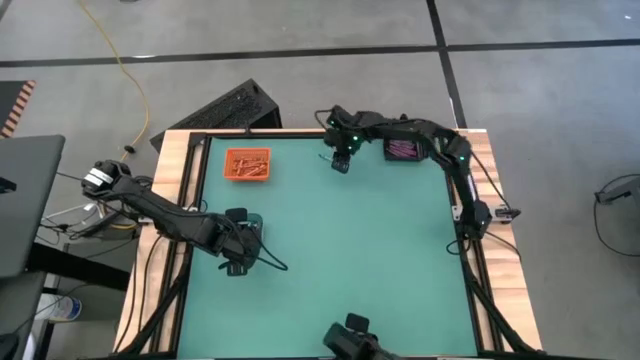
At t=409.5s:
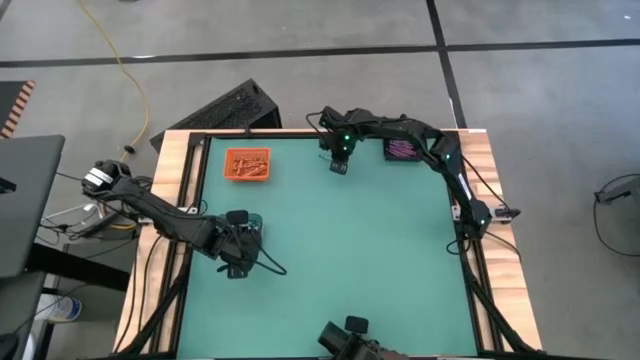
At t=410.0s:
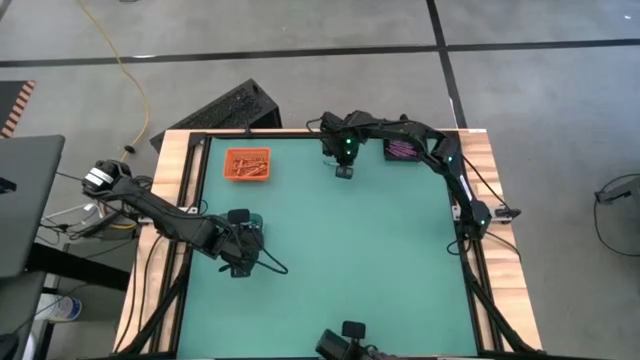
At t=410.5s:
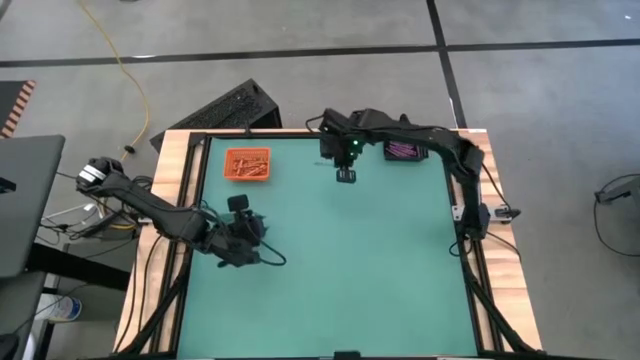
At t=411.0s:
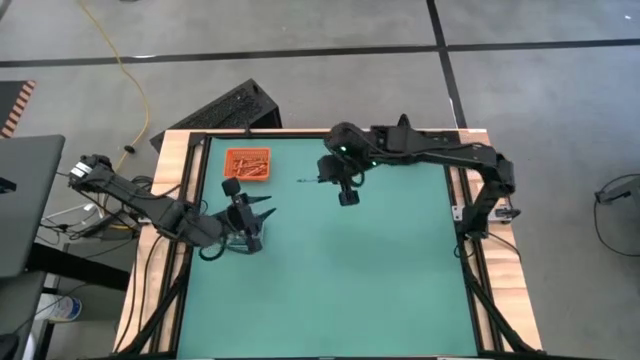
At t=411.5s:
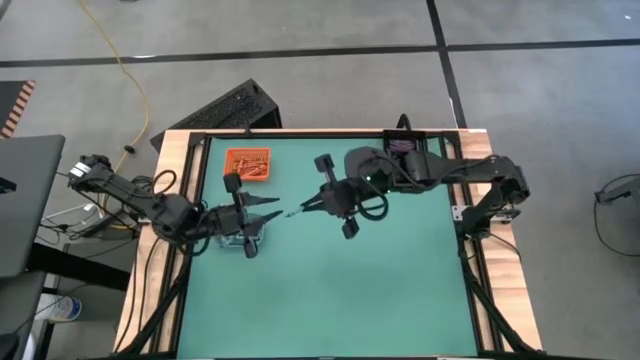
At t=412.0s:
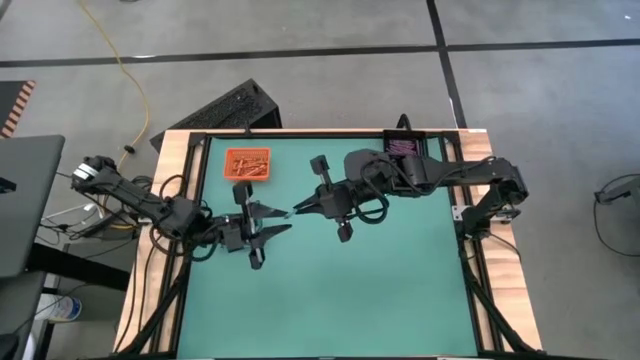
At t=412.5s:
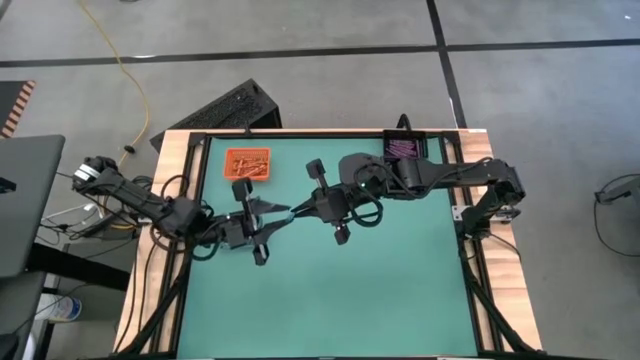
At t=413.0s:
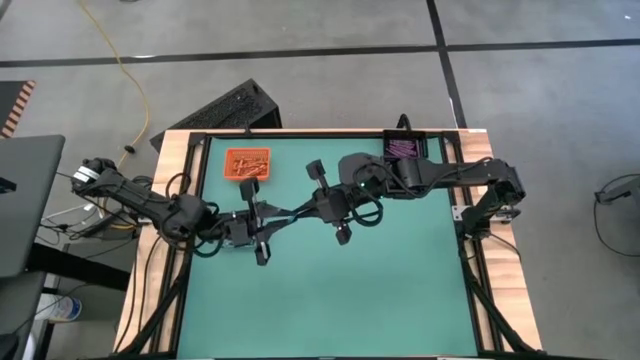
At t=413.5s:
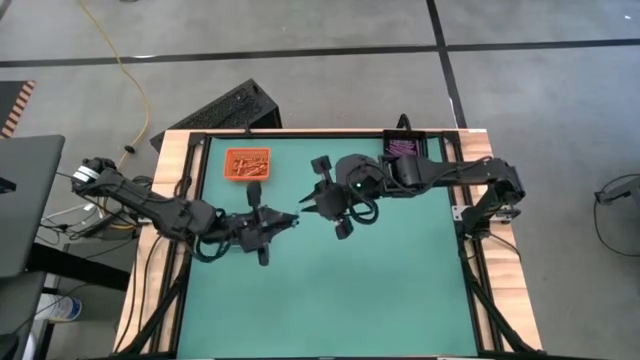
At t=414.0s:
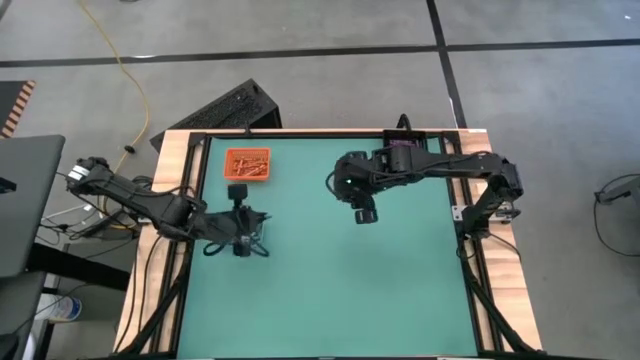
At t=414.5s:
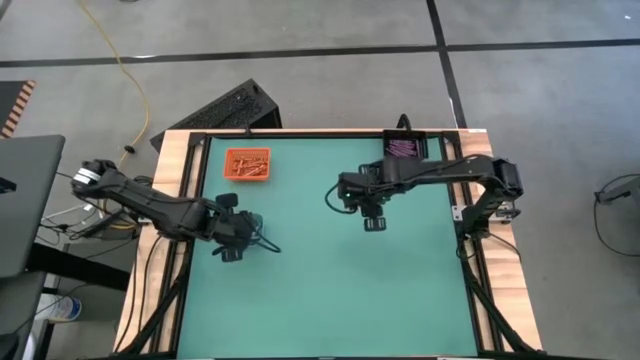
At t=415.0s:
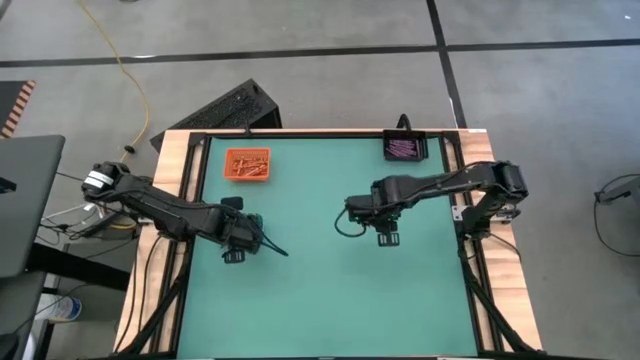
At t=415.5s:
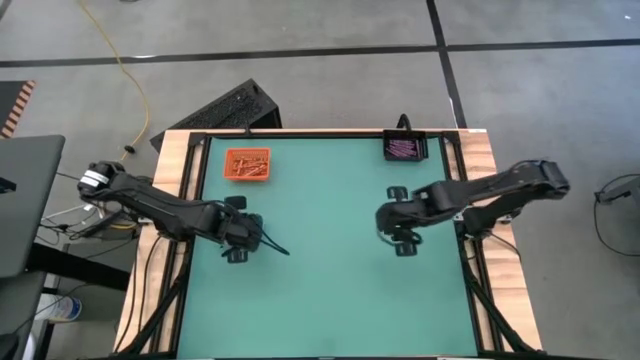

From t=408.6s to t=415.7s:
Task: Sort crayons
Put the blue crayon into the blue bin

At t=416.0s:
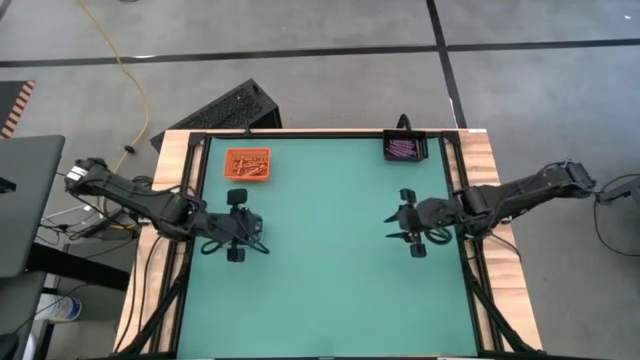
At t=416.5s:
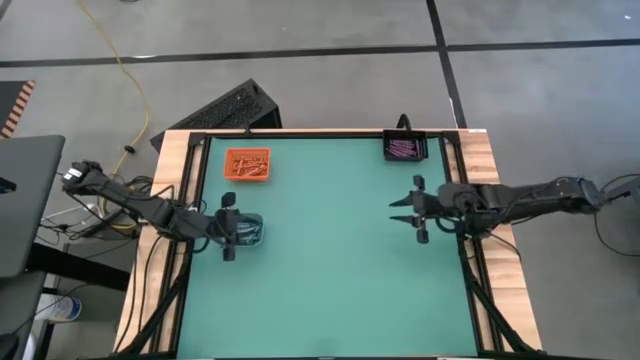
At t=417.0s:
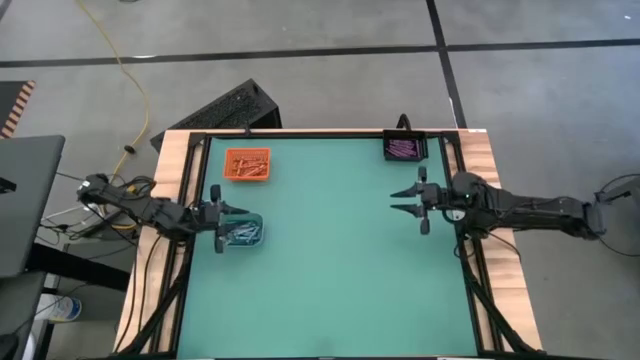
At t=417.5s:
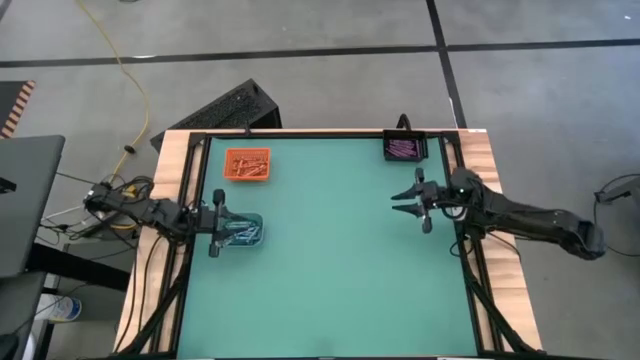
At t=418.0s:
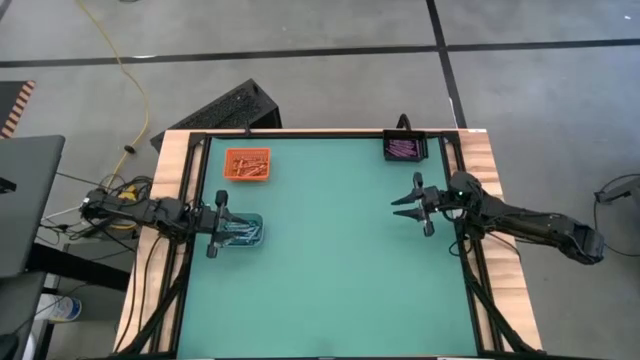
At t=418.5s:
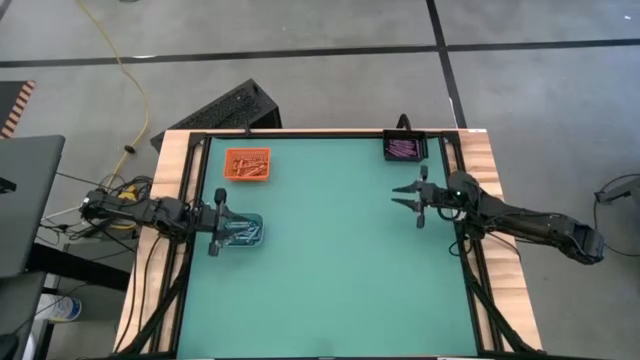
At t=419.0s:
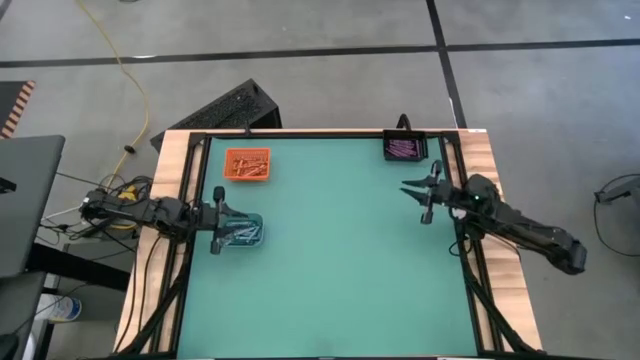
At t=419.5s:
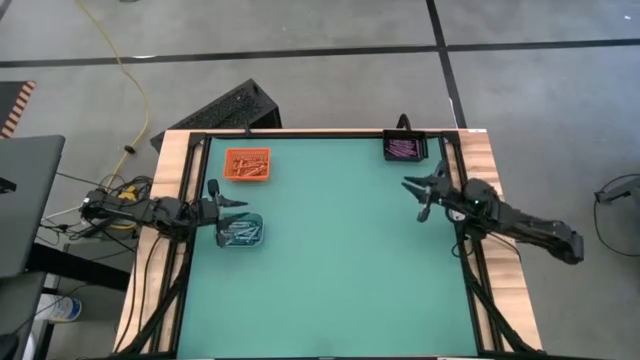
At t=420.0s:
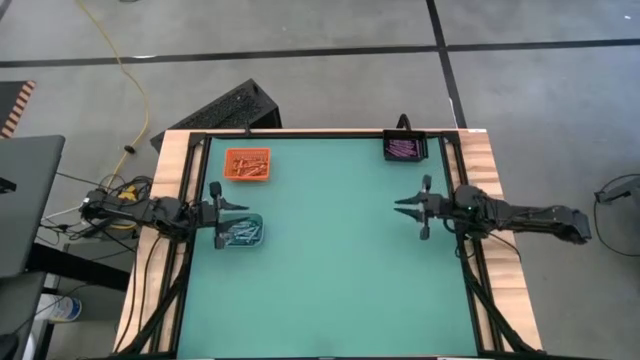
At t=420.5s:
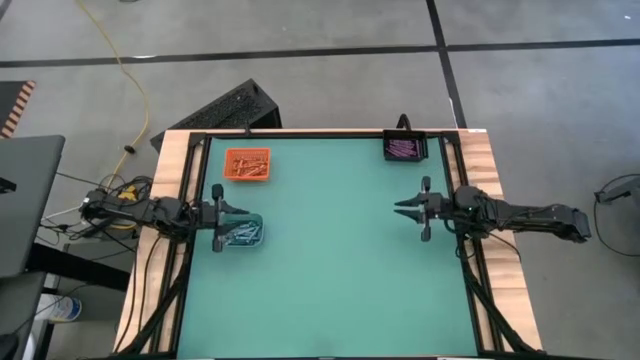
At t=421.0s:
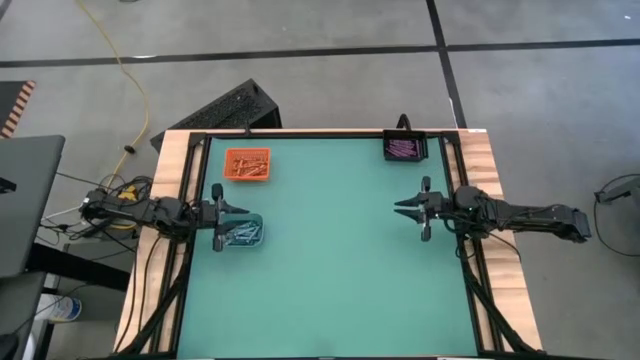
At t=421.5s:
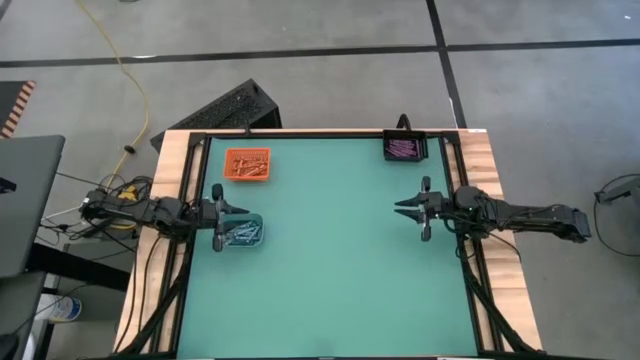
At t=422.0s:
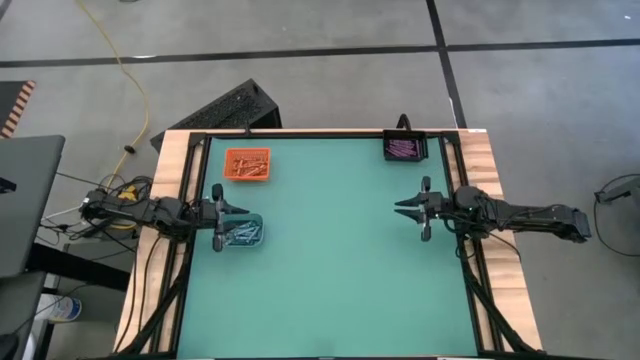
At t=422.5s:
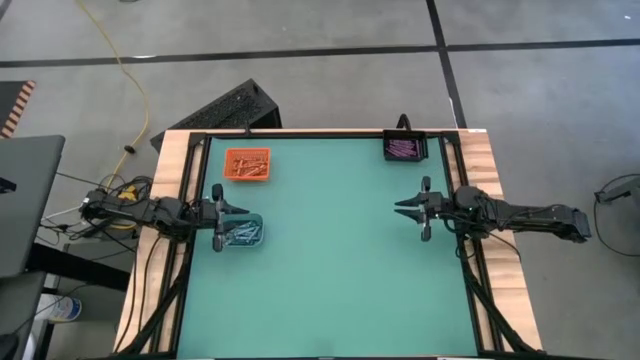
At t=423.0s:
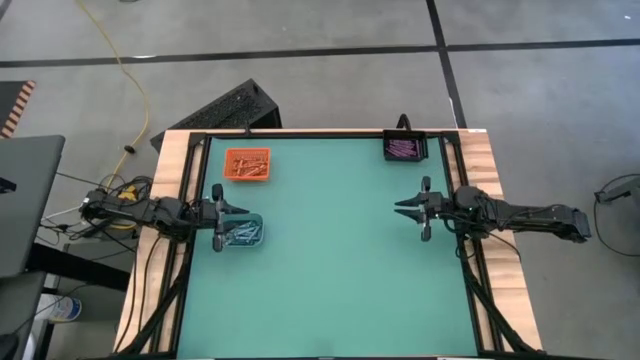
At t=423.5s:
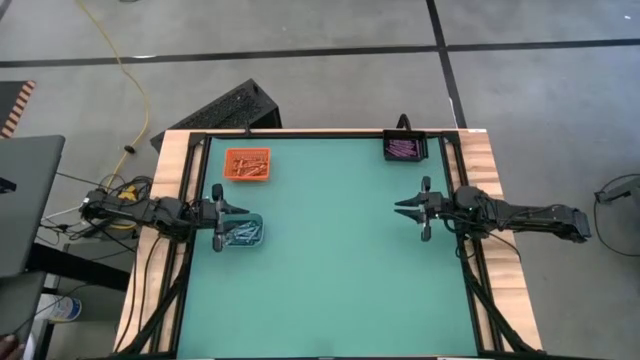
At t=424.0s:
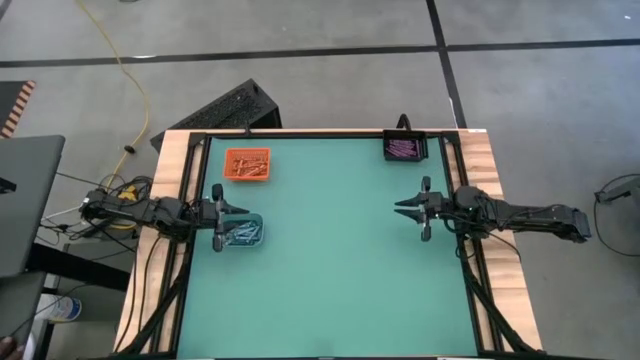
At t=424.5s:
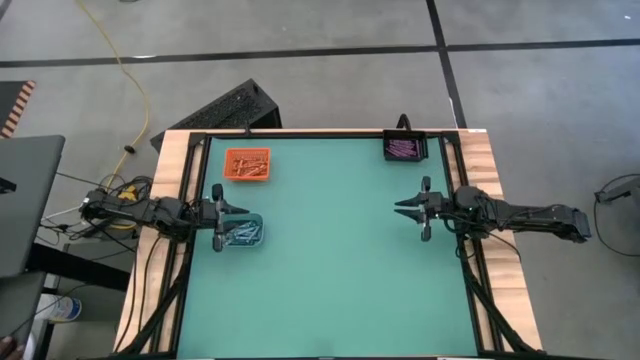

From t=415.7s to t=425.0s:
Return to Home Position

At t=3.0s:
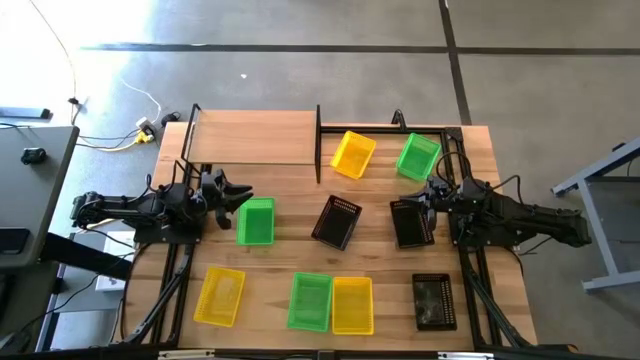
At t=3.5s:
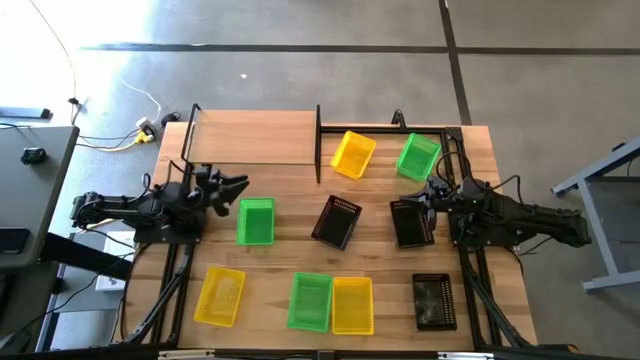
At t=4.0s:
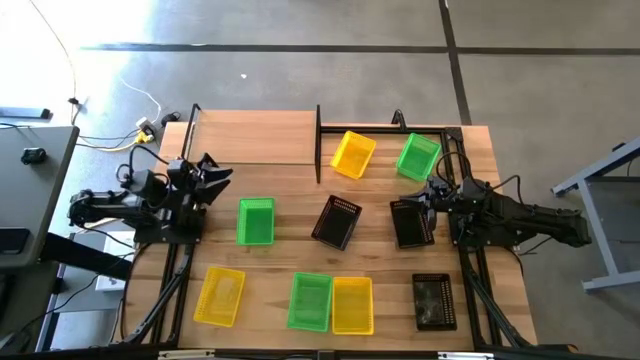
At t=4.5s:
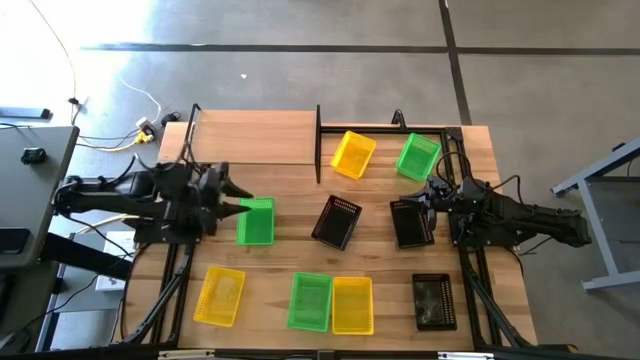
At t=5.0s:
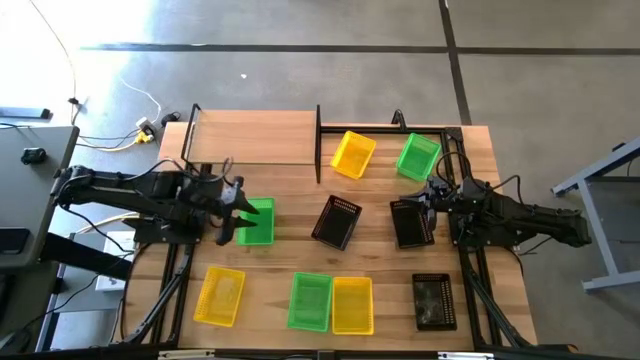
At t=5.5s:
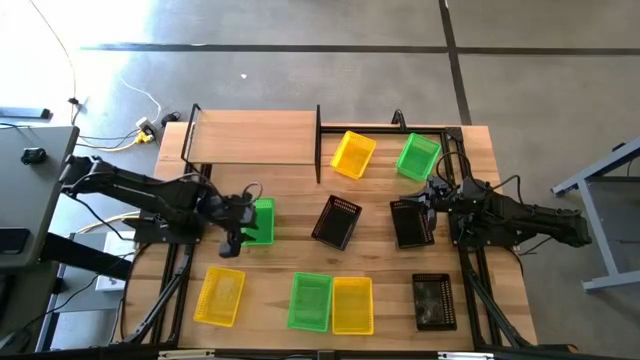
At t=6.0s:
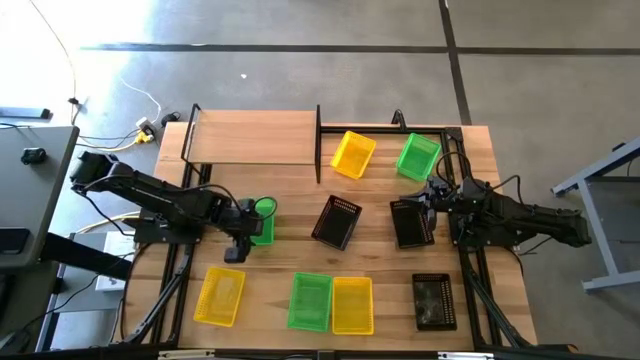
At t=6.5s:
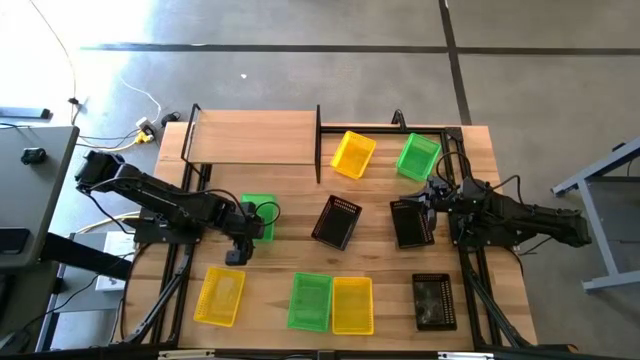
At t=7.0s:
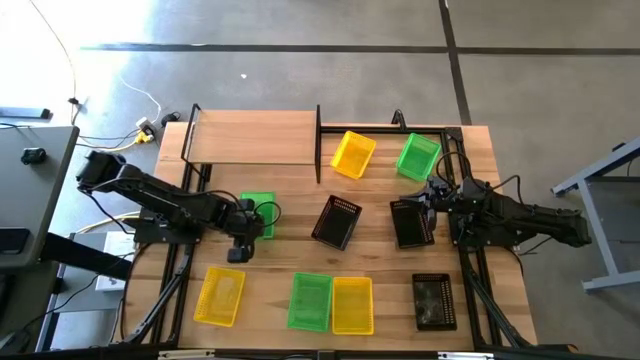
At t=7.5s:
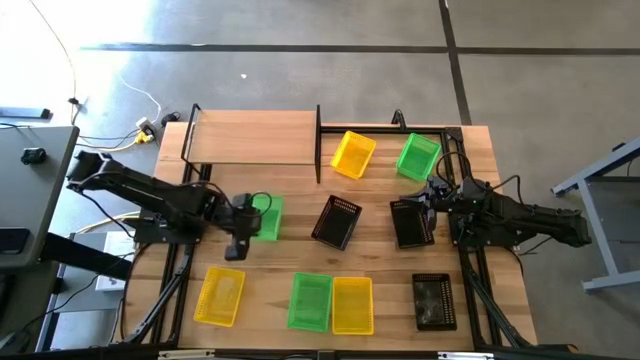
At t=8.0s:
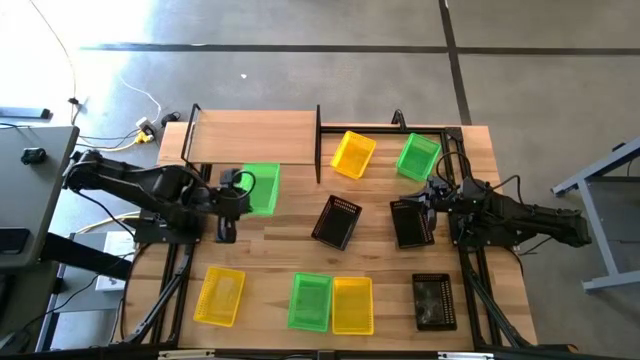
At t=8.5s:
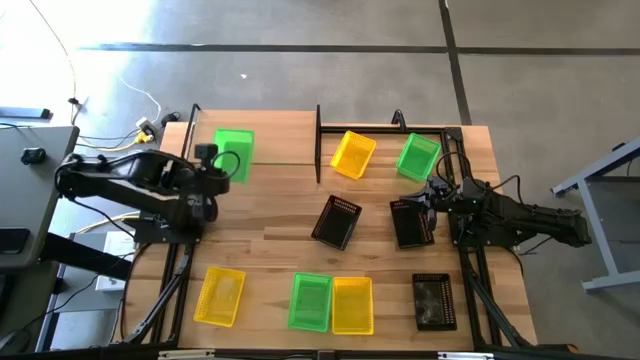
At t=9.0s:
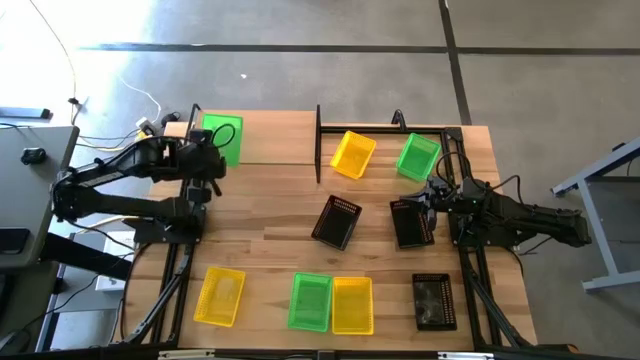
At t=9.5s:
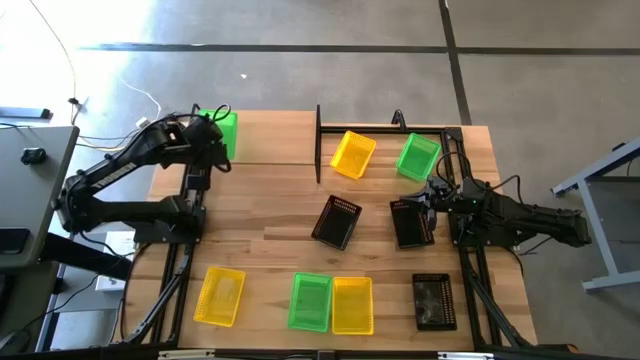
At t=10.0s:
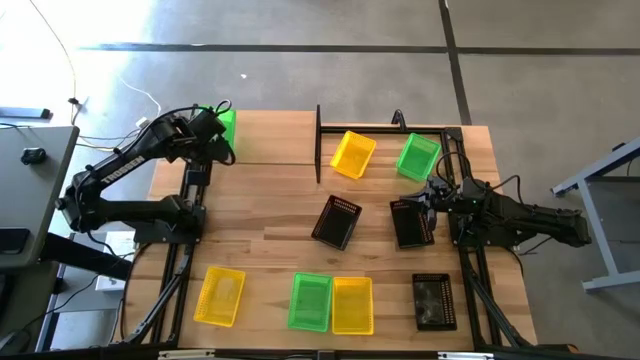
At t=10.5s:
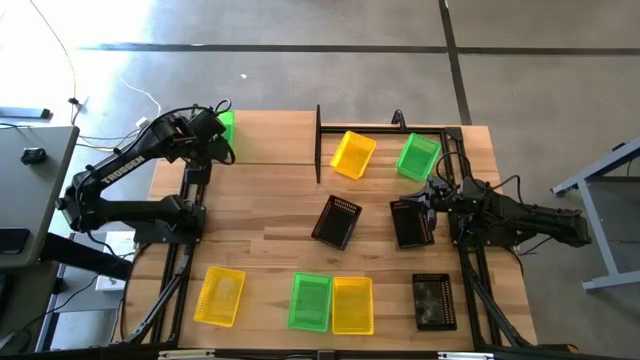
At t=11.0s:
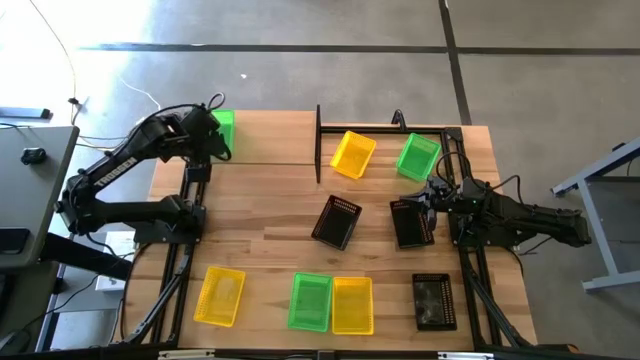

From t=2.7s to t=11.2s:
Task: Stack baskets on shelf by color
Put the middle green bin on the shelf
